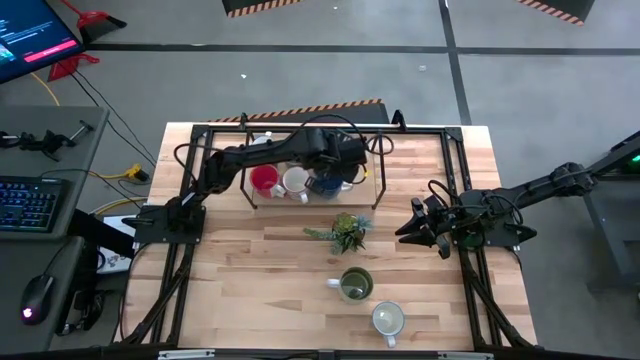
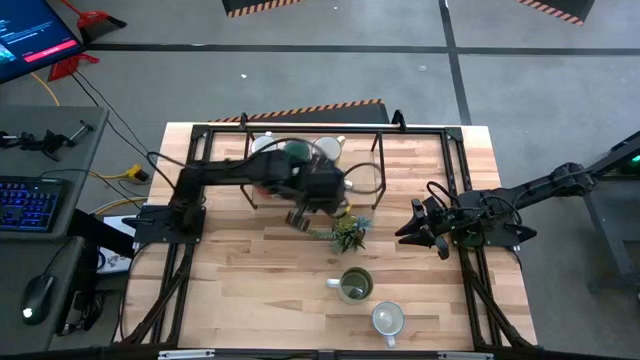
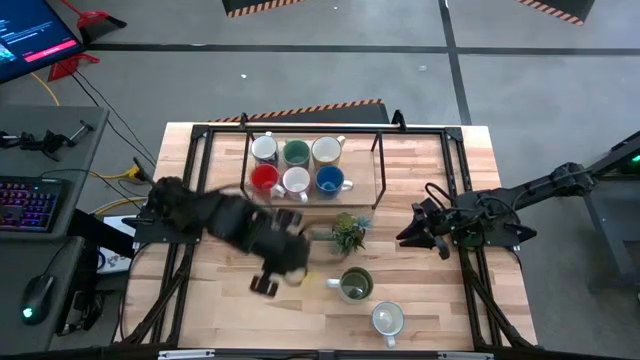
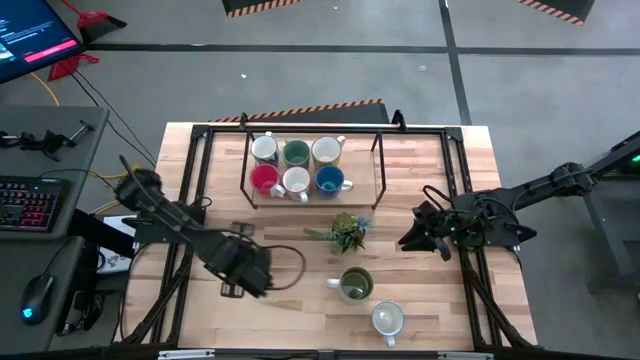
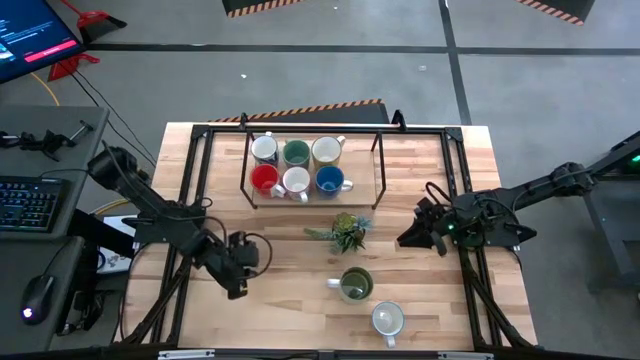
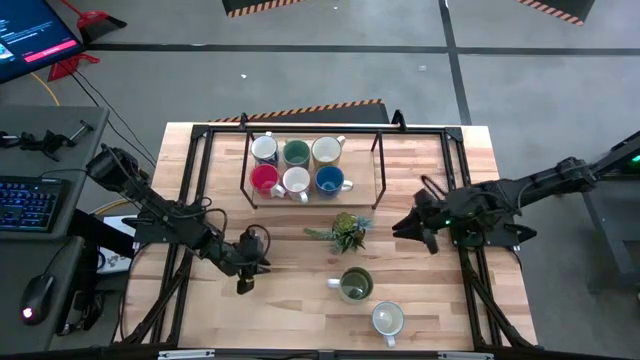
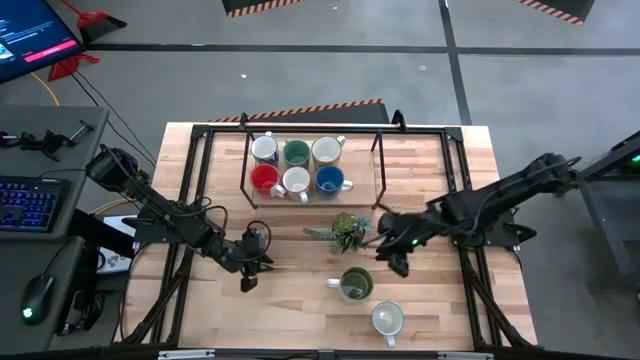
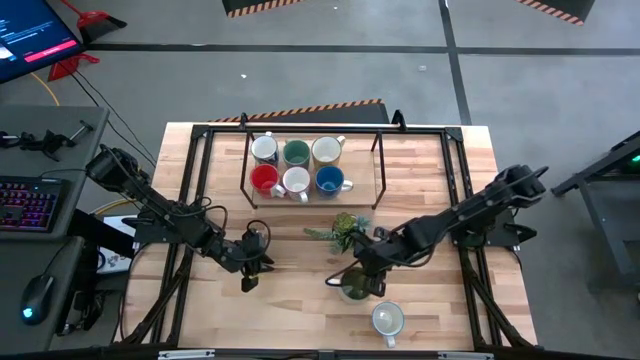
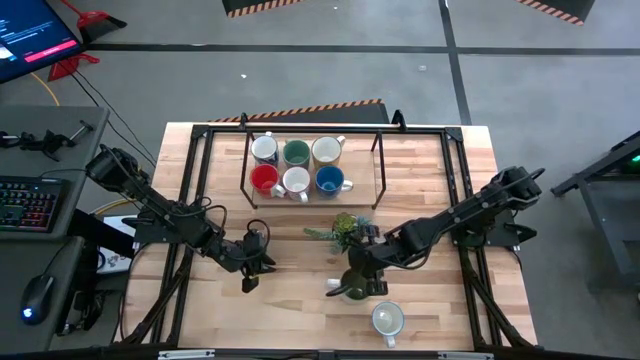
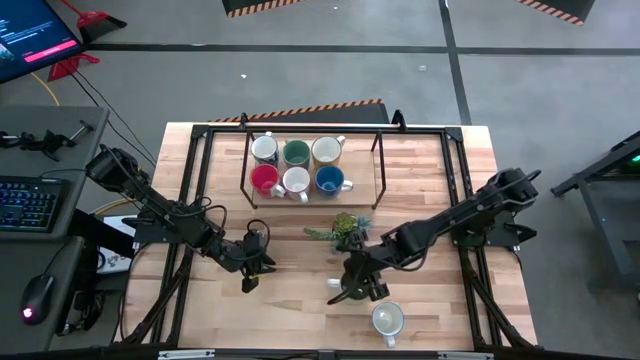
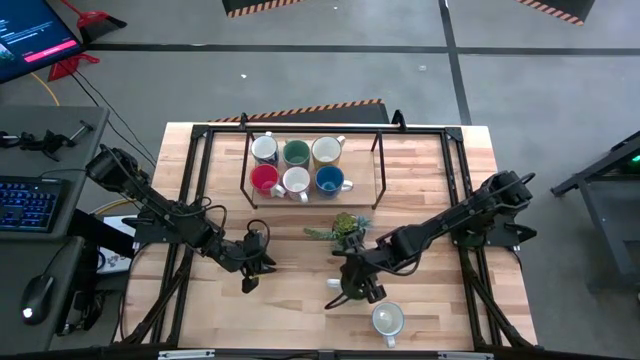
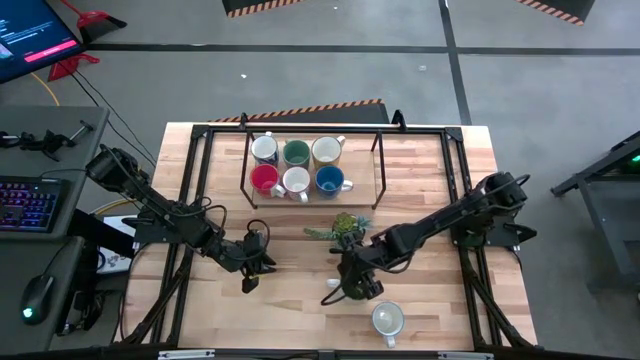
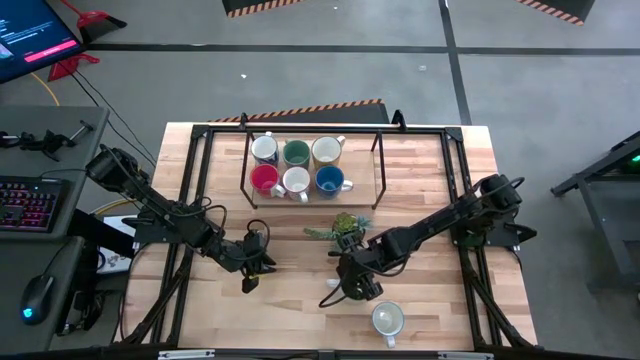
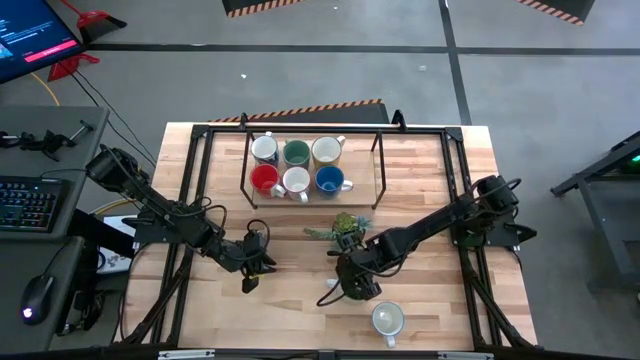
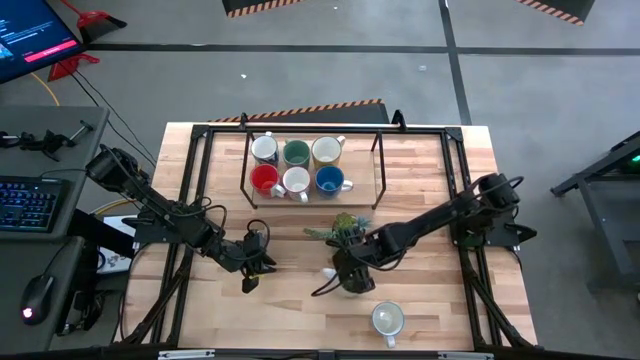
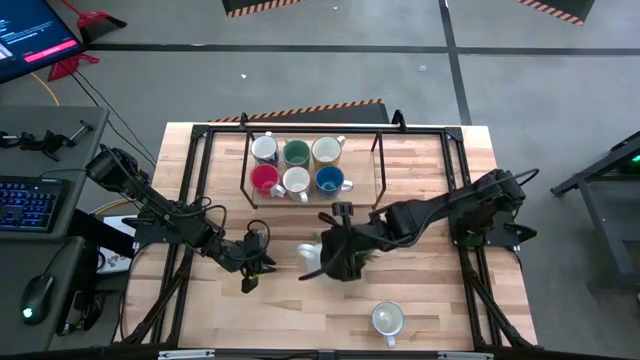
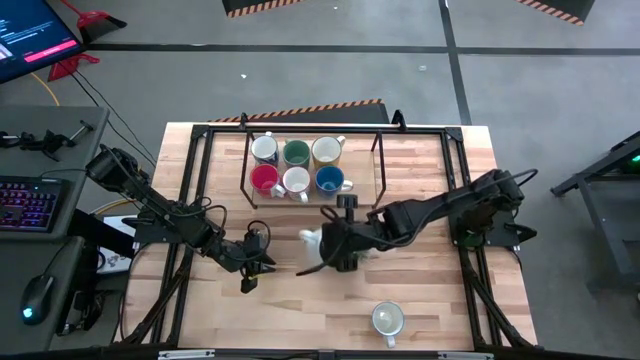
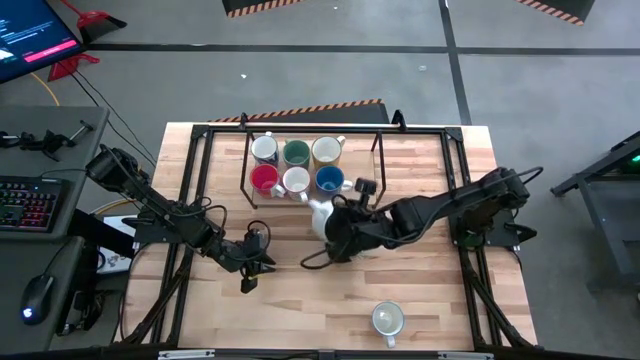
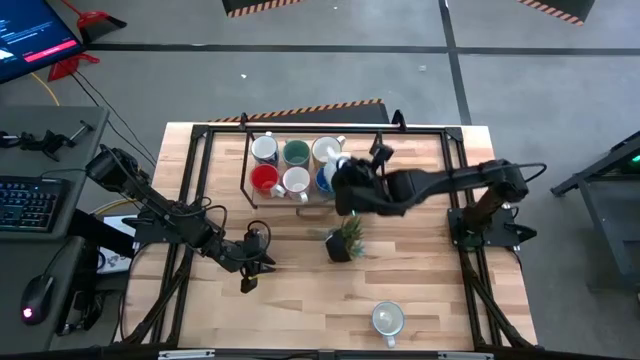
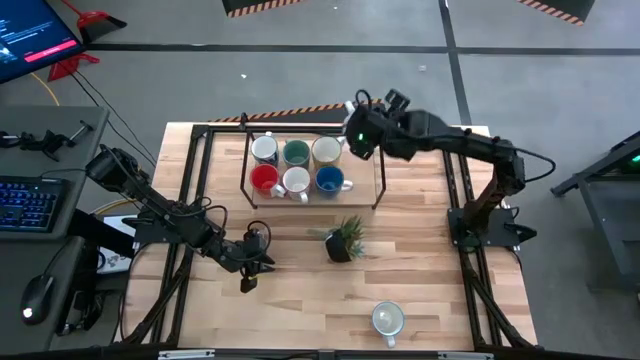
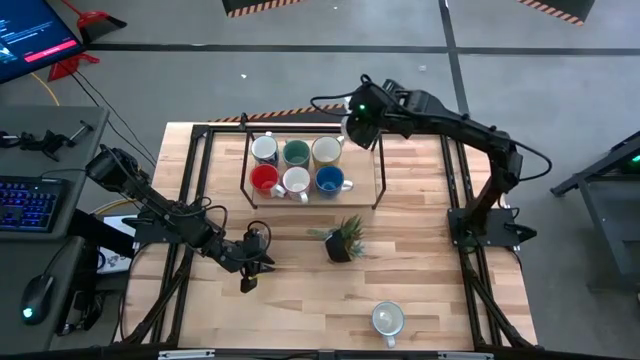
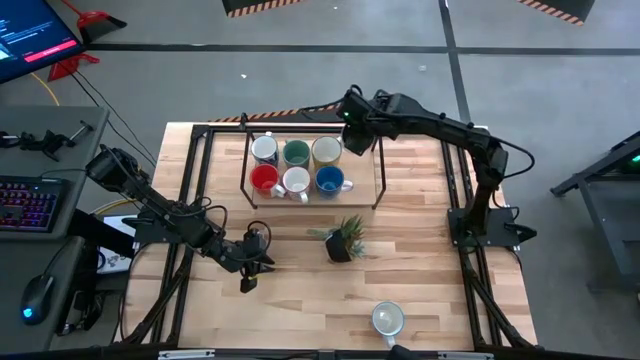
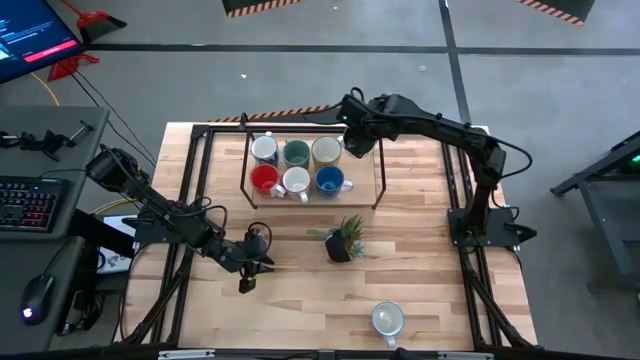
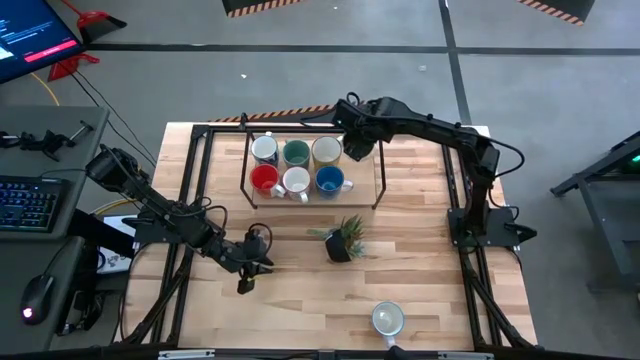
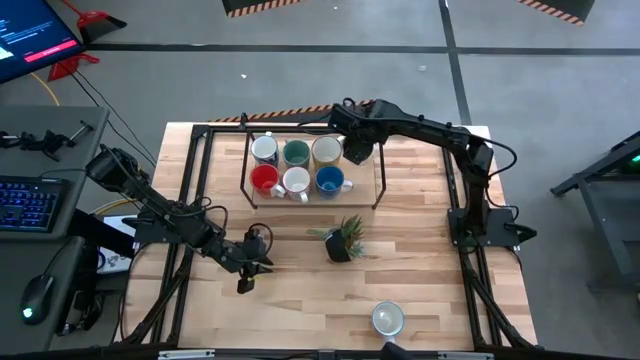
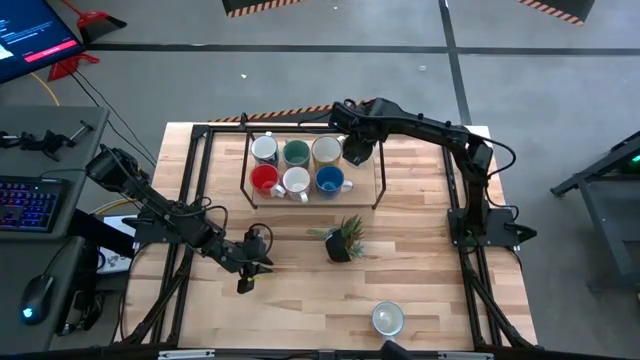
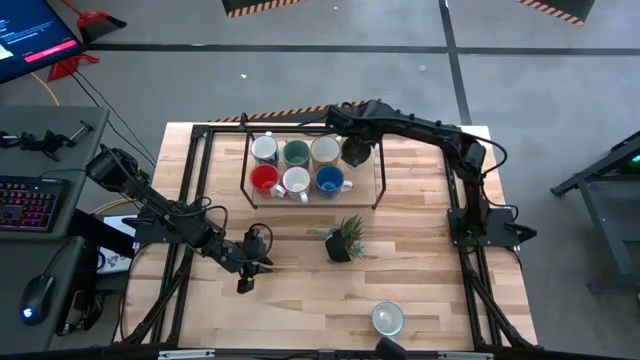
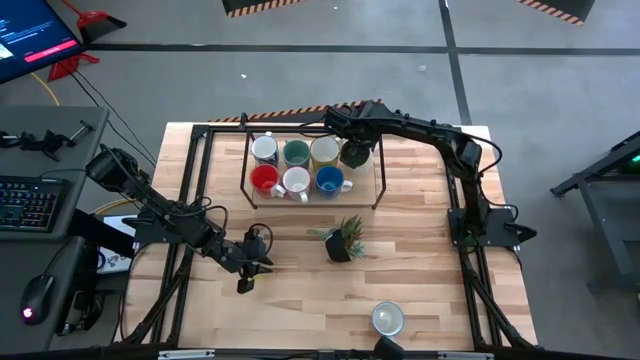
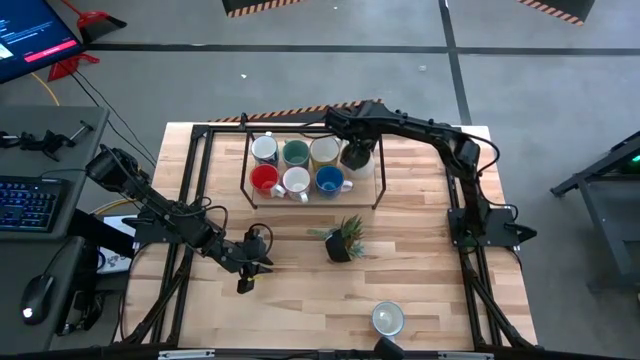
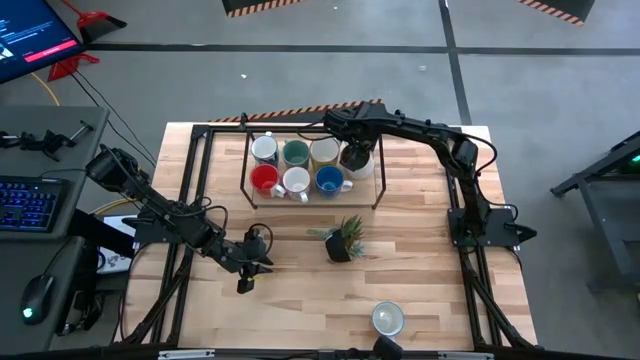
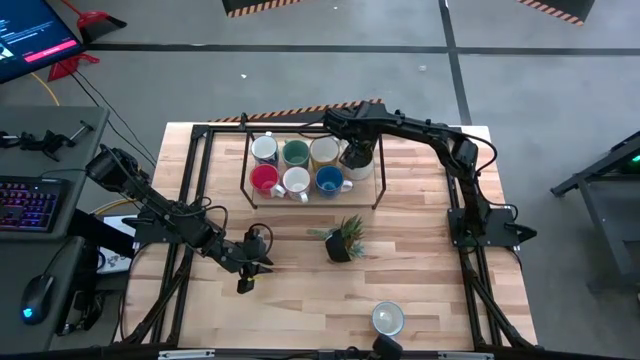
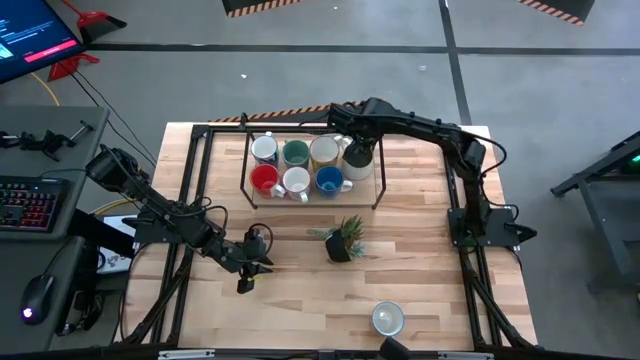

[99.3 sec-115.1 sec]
Task: Place coffee mugs
Put the white mug on the shelf

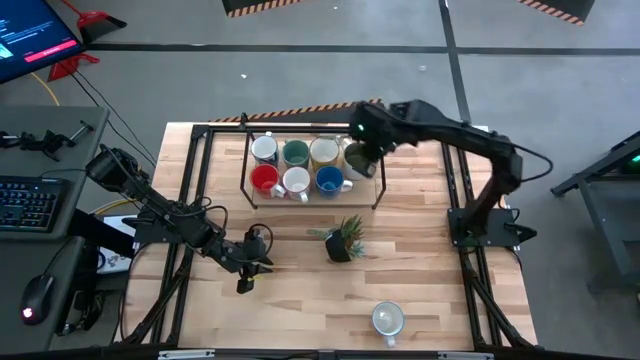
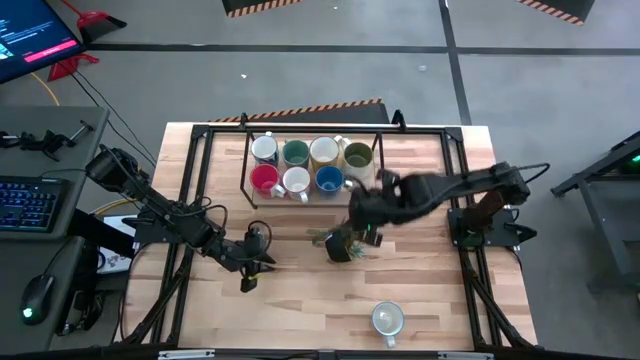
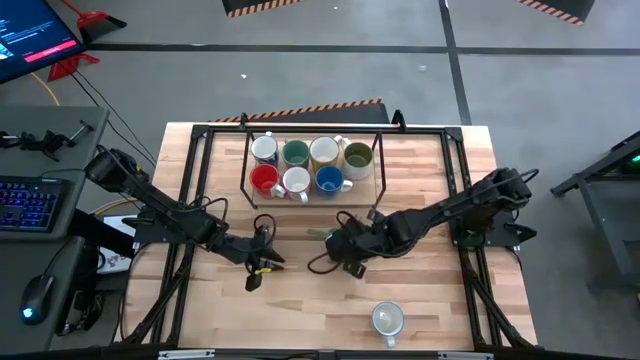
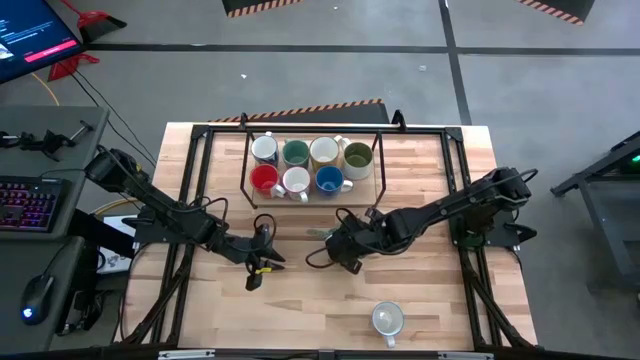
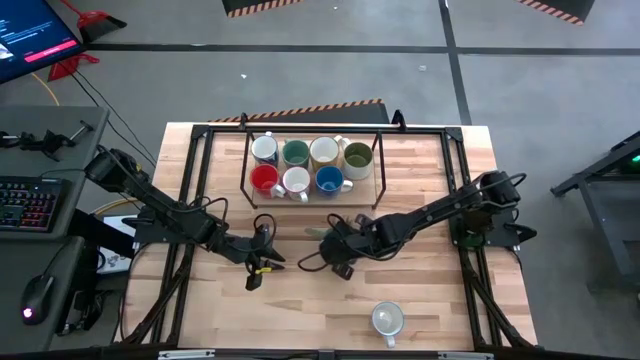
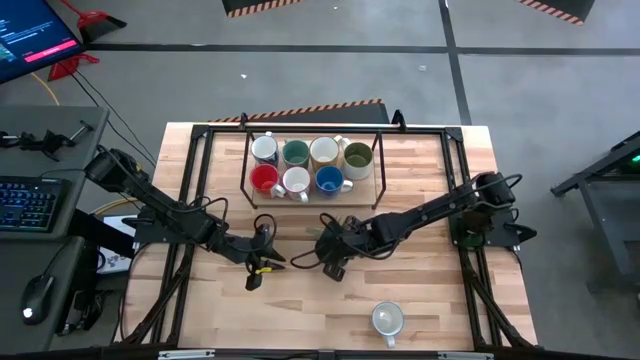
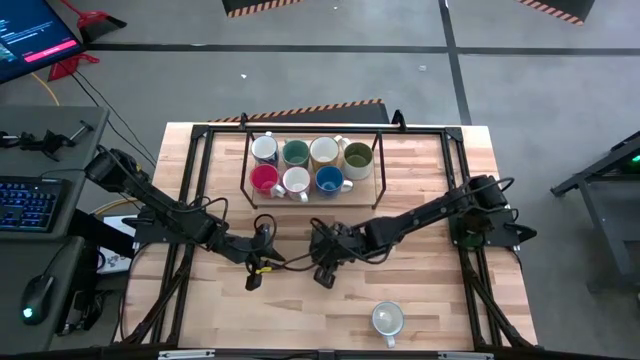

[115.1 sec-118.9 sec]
Adjust the black potted plant on the table

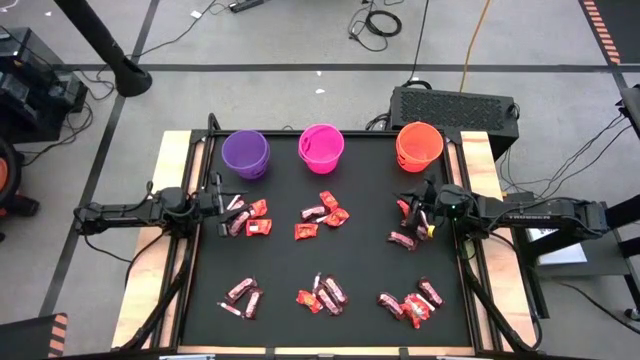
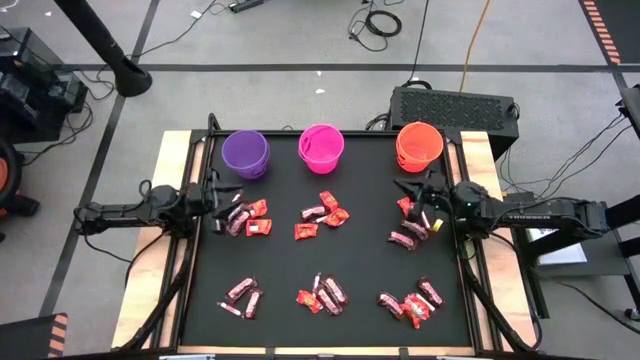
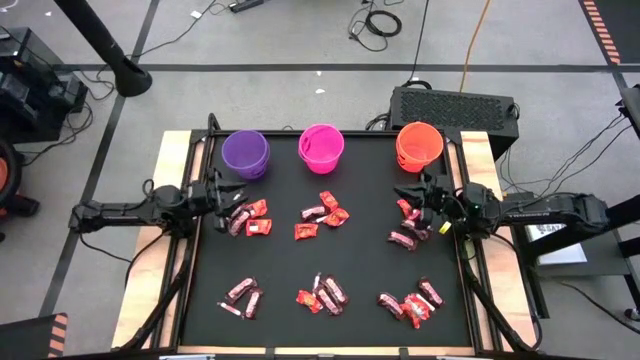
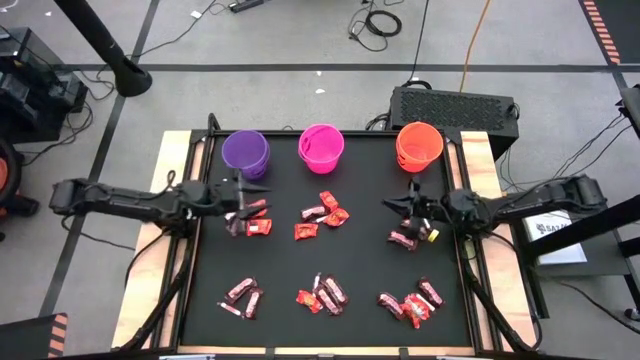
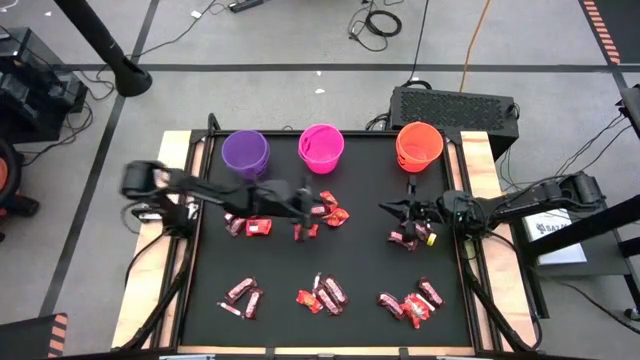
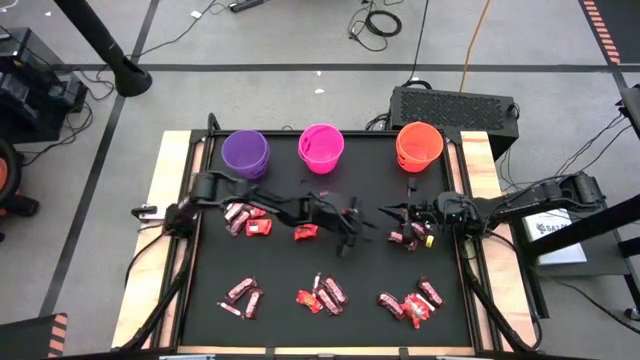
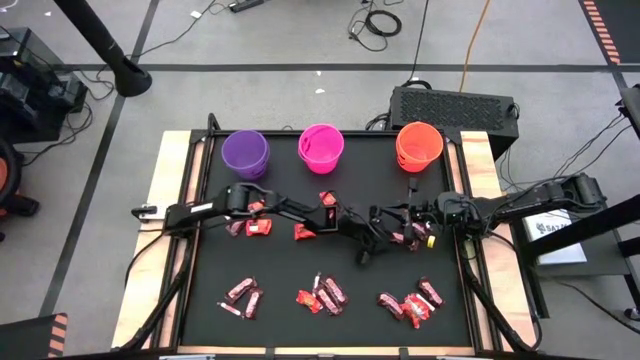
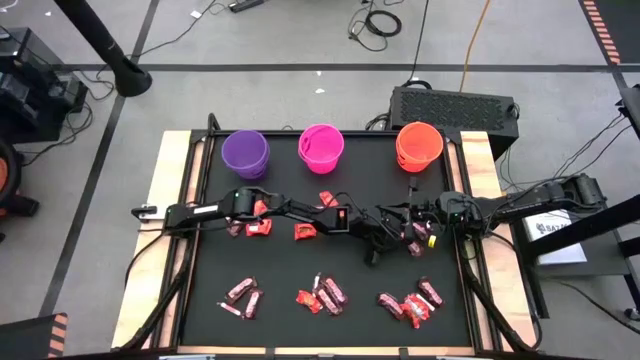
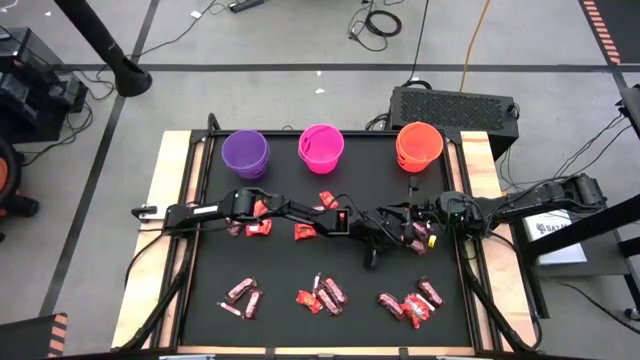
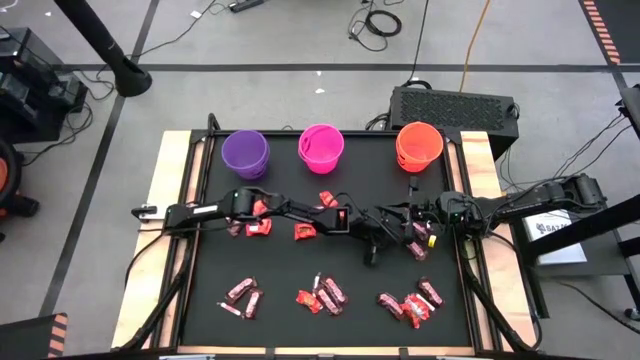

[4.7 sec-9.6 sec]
Task: Sort candy by brand, put in halloween buckets
Put the brown chocolate bar into the purple bucket
